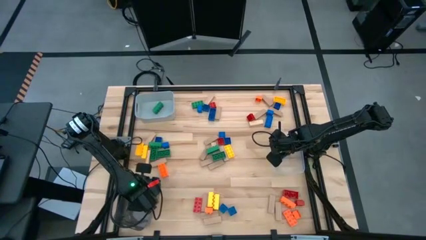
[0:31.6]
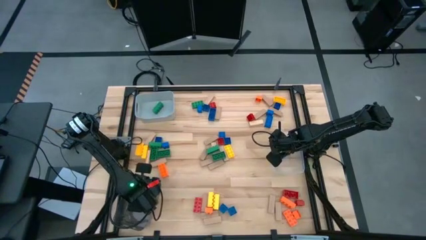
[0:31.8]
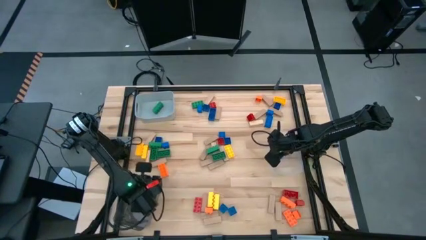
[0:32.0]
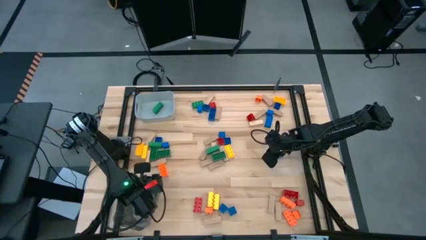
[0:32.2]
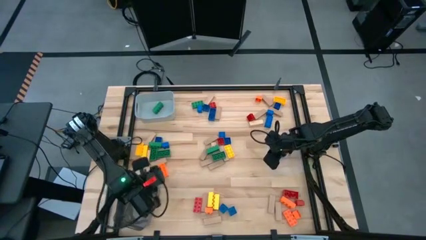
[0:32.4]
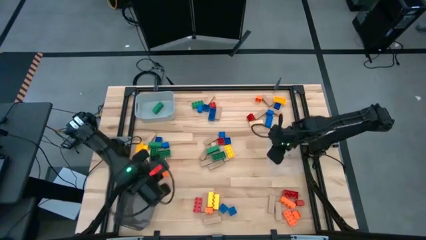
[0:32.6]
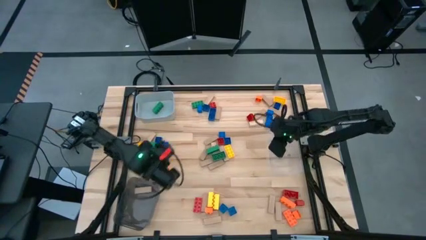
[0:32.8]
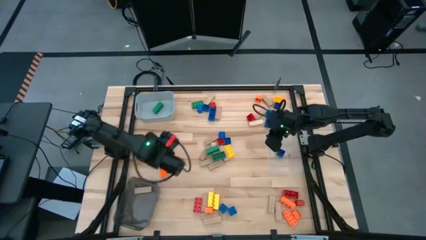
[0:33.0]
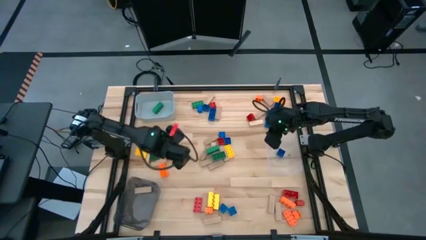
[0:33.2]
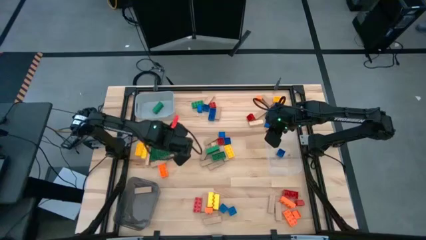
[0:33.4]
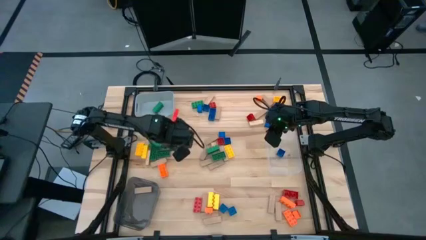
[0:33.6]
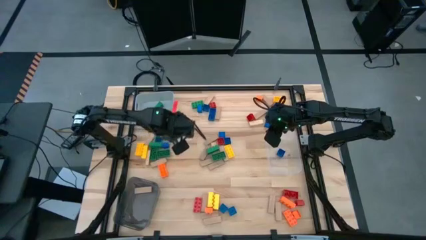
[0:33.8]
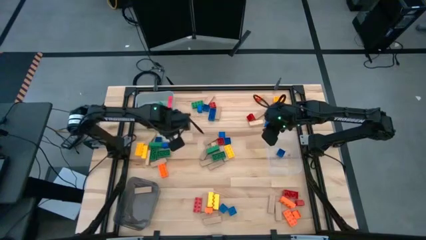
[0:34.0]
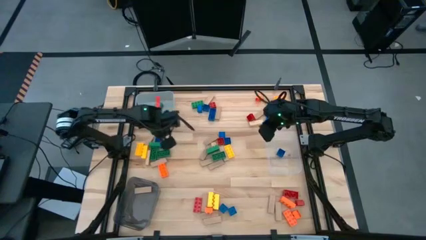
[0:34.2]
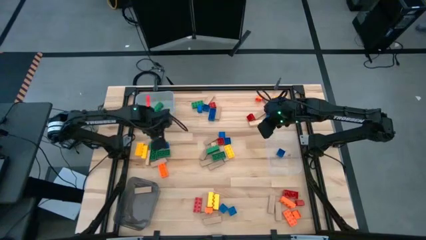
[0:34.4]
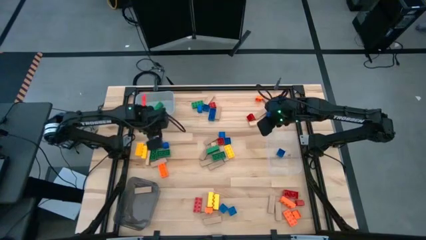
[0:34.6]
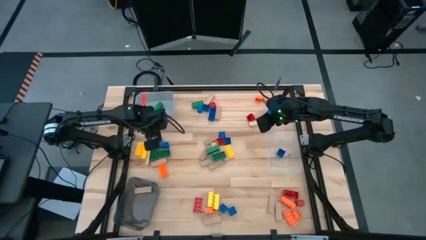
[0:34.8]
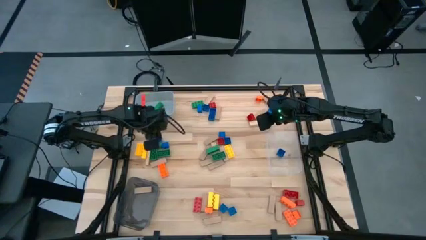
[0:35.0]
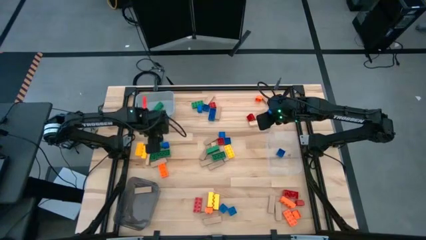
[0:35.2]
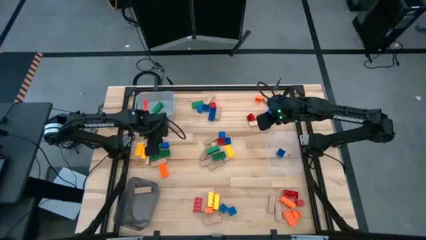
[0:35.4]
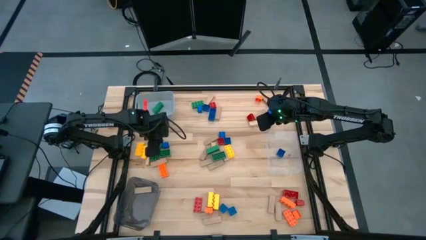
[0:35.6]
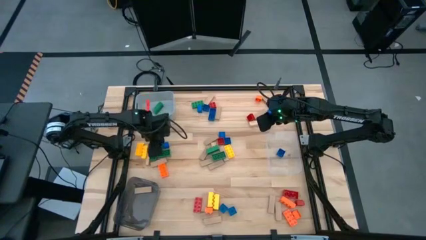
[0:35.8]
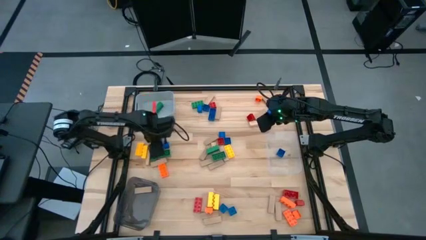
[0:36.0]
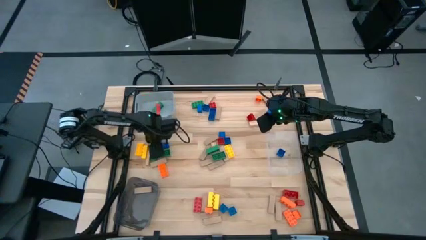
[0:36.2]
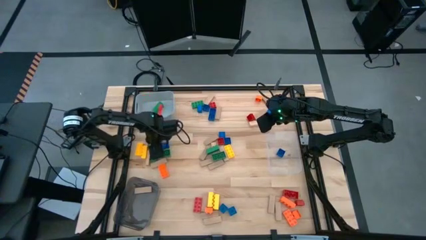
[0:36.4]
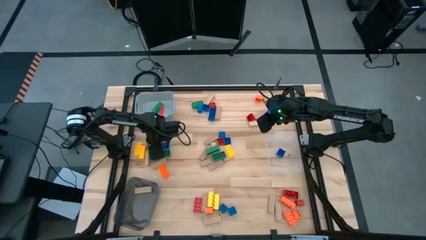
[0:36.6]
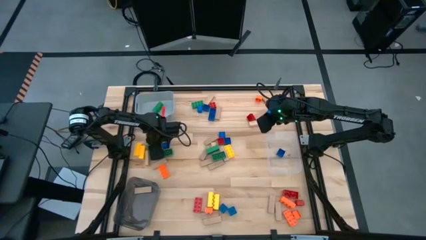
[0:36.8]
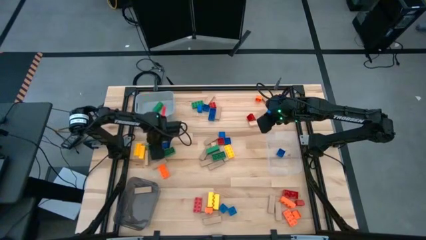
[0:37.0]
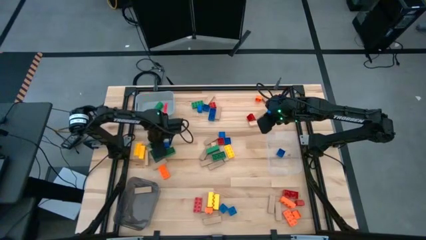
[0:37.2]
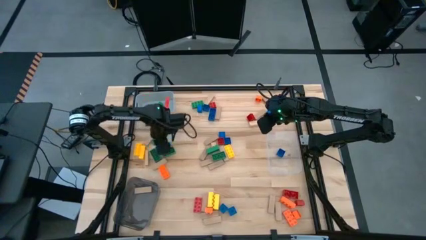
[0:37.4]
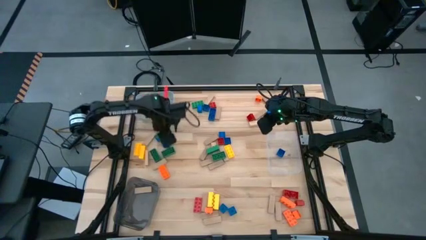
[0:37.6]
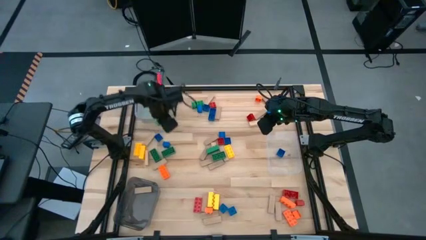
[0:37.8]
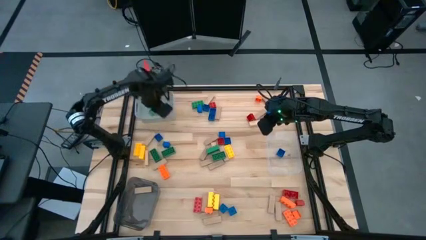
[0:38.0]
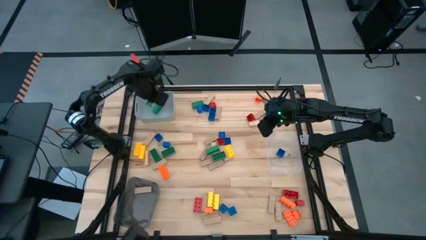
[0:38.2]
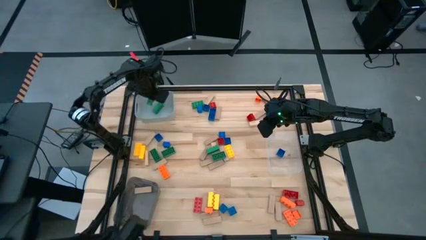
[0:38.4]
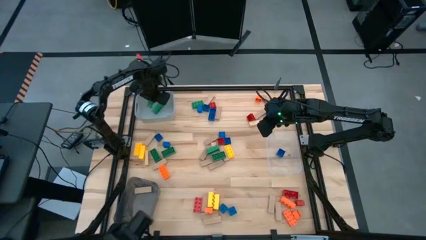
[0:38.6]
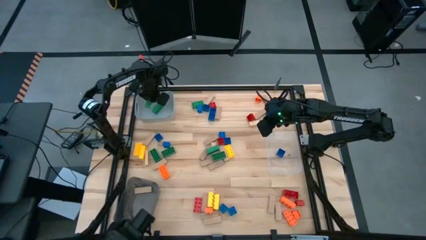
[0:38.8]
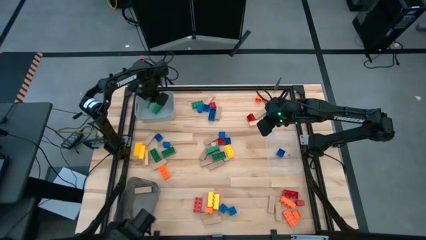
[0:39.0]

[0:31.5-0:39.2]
Task: Sort blocks by size
Put the large green game piece into the gray bin

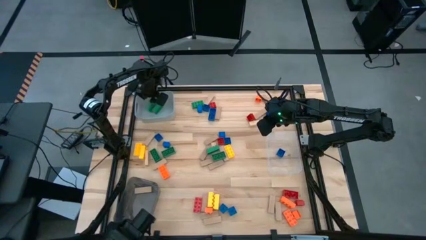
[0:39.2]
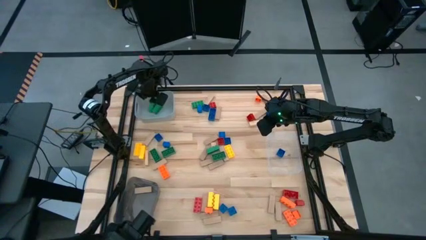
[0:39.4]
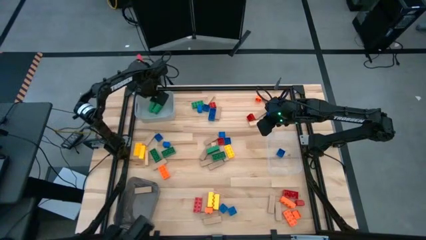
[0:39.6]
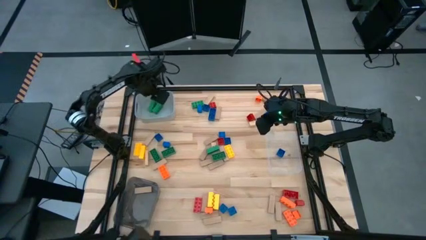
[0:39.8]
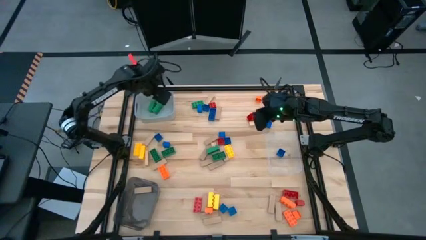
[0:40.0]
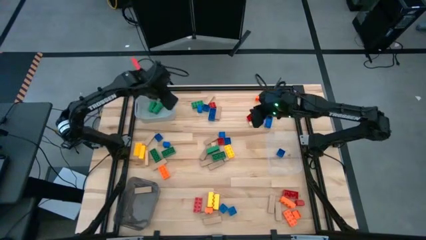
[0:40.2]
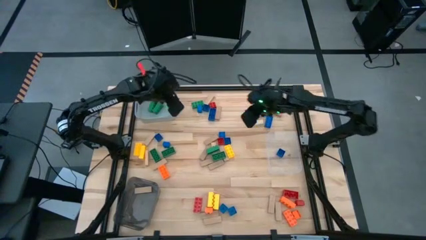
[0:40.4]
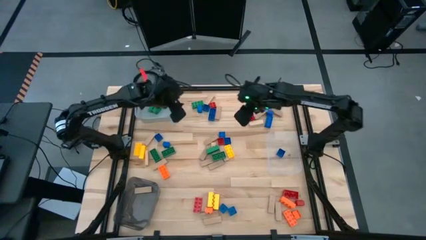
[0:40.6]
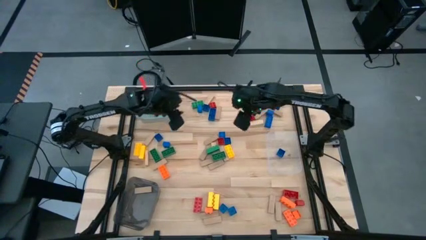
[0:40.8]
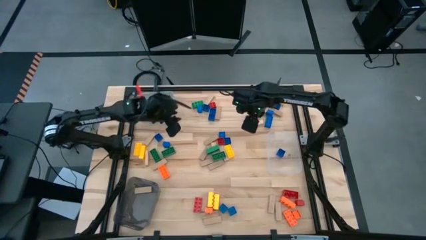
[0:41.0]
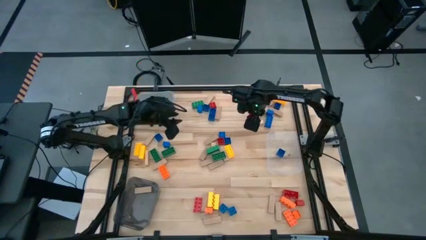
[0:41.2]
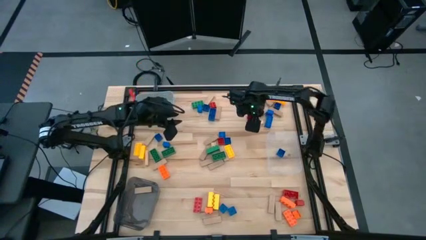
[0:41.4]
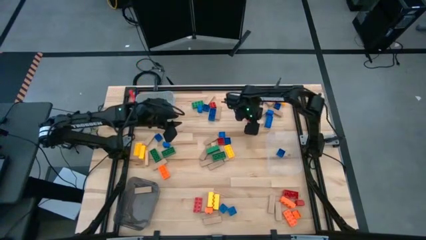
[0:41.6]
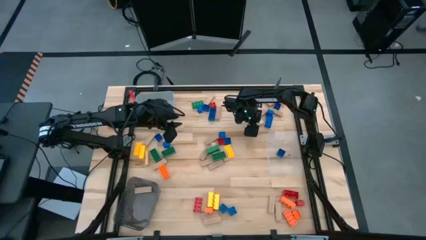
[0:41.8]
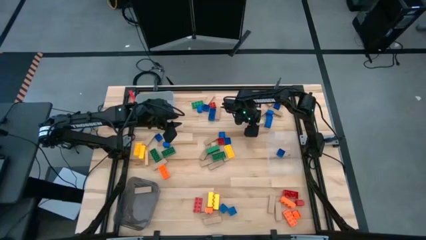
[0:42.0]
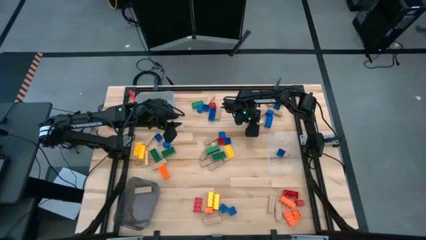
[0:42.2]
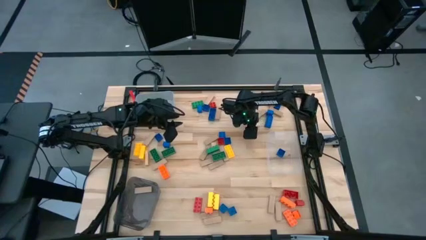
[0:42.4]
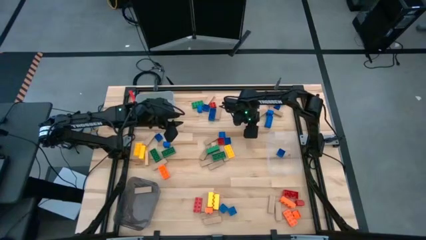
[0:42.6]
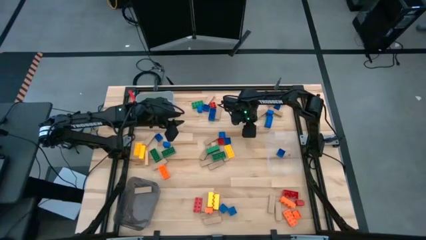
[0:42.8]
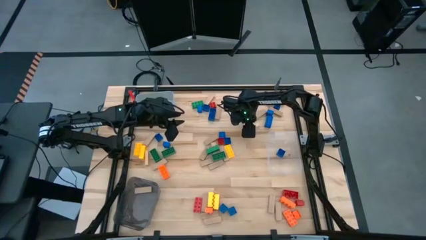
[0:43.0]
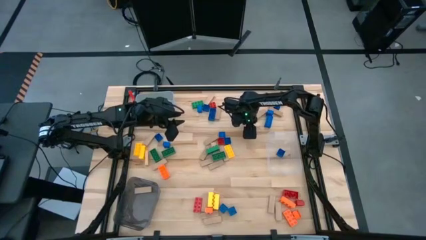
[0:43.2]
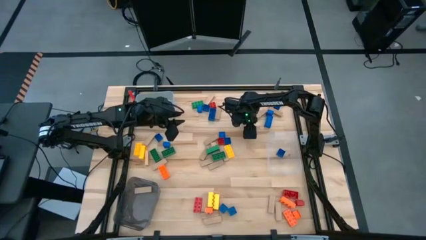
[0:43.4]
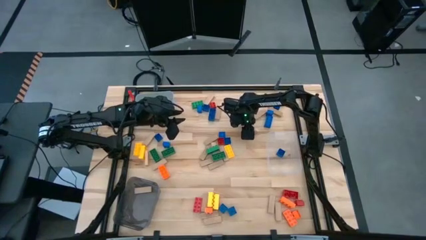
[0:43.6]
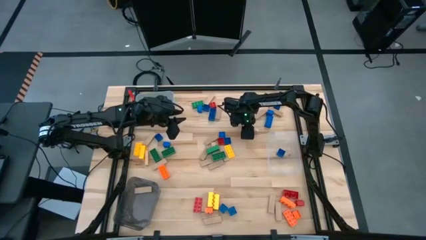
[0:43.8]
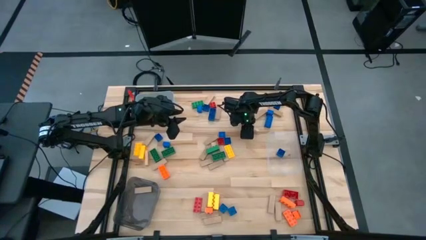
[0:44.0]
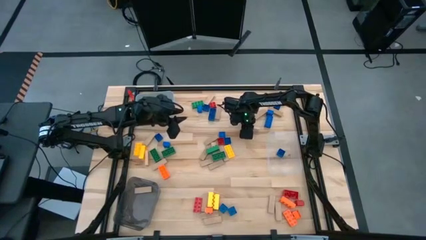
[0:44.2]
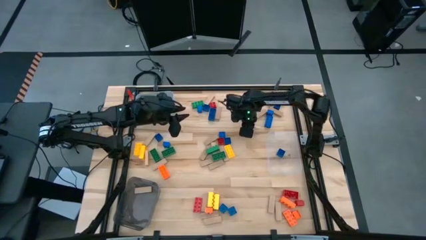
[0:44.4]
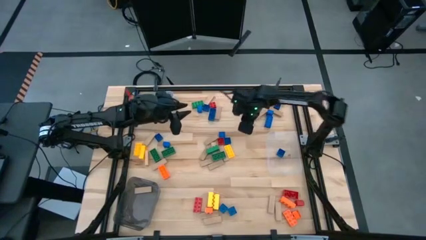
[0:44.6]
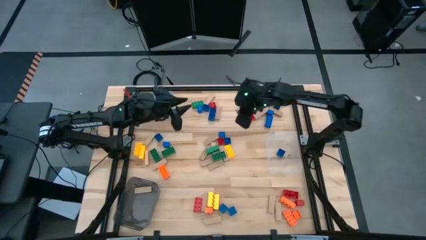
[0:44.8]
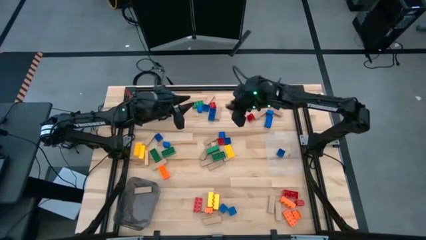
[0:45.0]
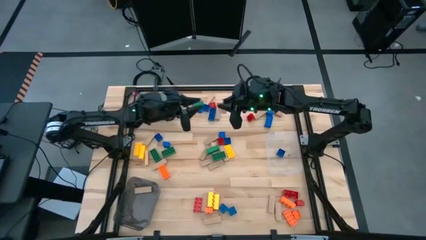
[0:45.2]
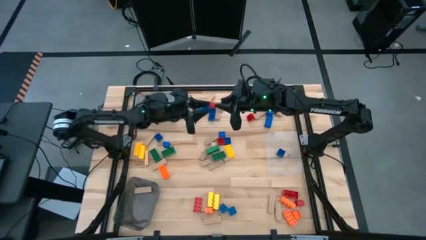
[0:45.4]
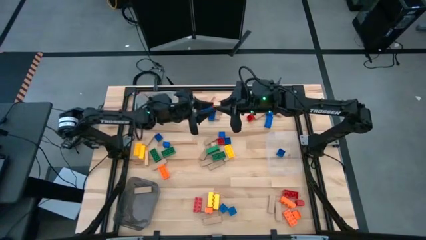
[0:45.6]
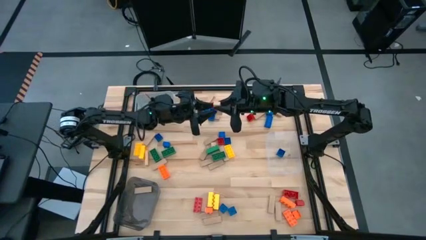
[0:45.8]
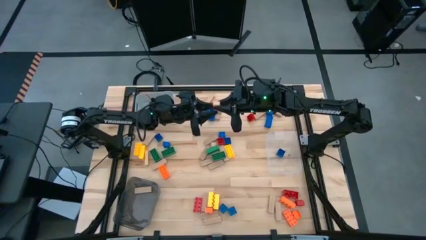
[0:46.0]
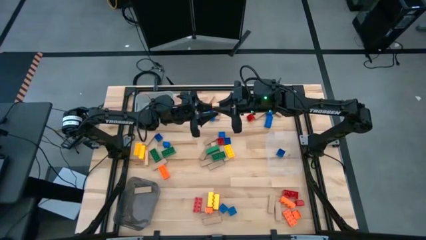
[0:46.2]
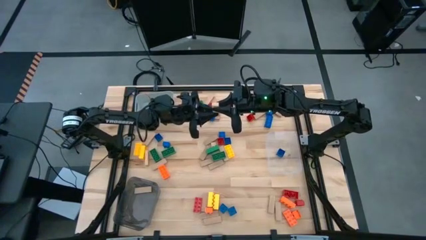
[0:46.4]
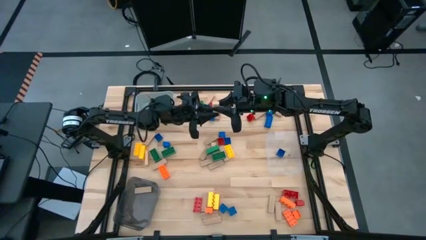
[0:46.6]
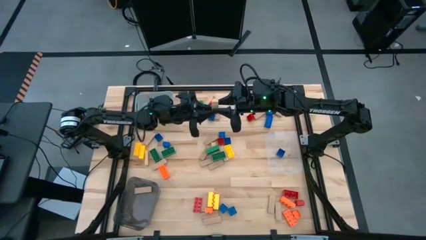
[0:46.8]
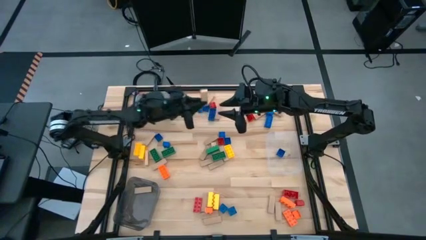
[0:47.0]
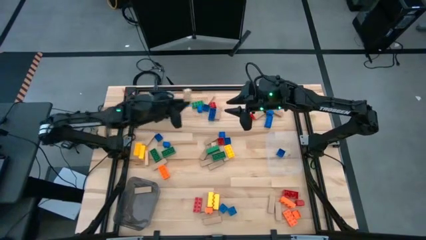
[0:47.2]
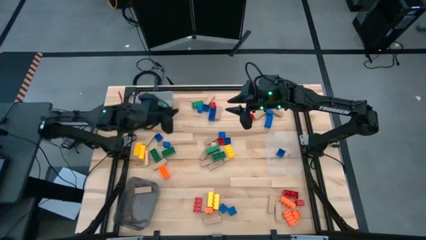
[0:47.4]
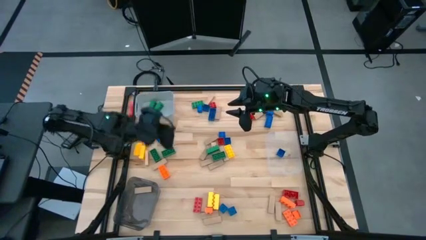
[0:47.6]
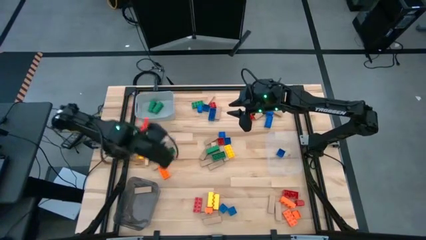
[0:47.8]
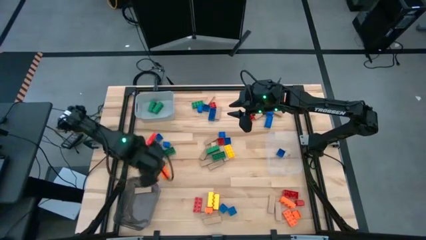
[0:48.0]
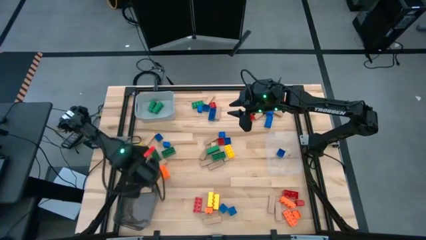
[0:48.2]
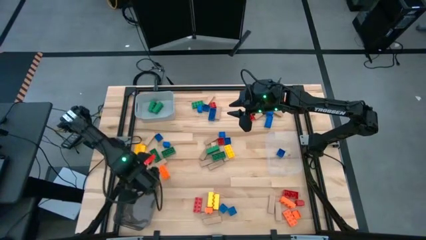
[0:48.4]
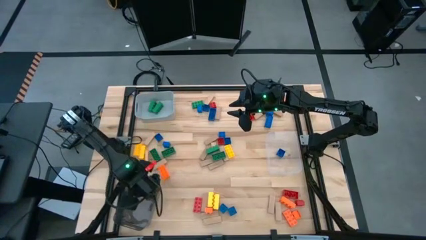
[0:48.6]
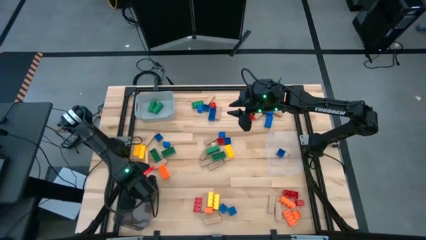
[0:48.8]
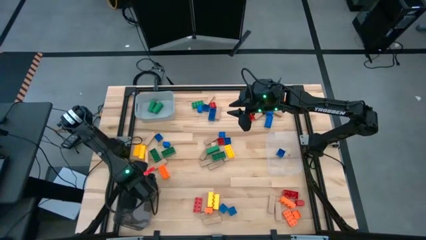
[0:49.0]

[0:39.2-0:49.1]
Put the brown block into the black bin
